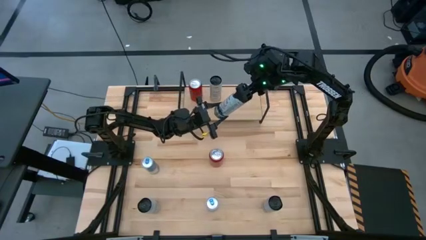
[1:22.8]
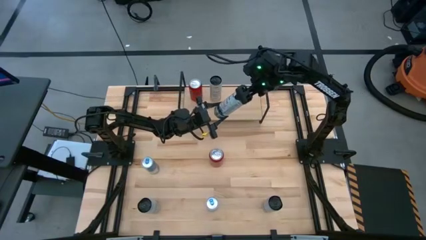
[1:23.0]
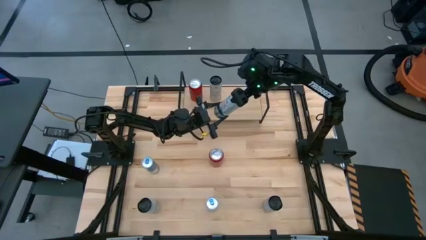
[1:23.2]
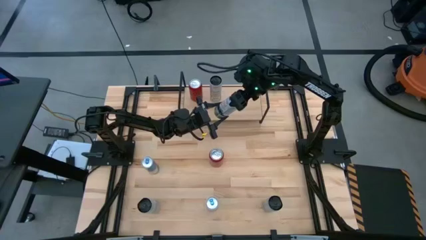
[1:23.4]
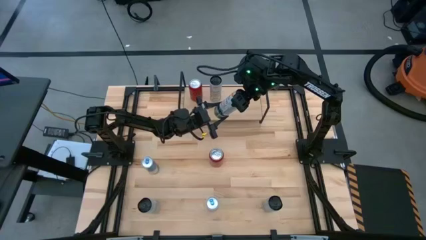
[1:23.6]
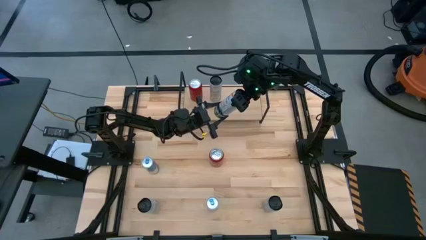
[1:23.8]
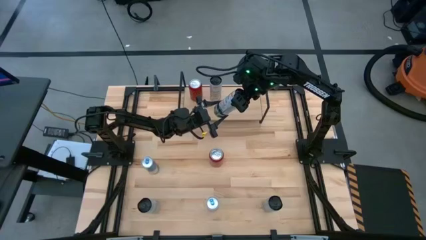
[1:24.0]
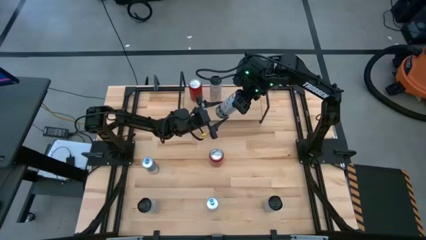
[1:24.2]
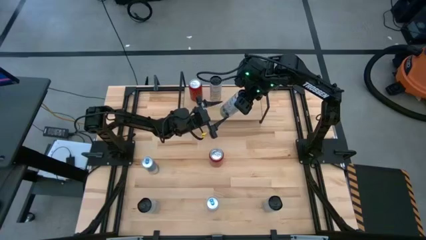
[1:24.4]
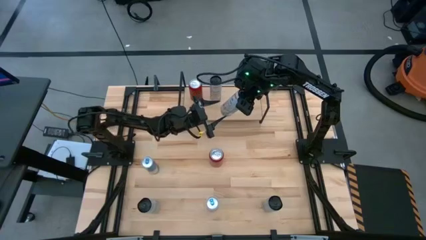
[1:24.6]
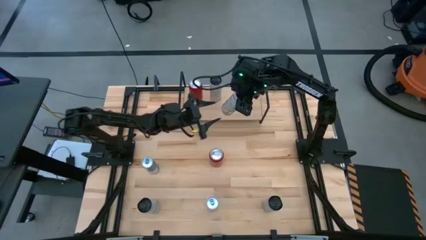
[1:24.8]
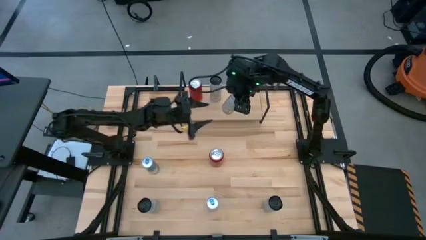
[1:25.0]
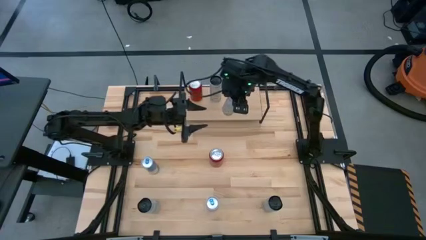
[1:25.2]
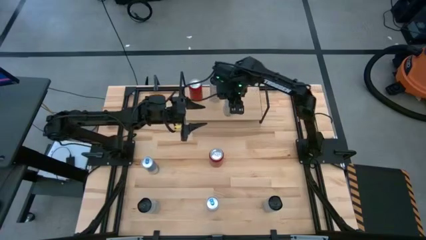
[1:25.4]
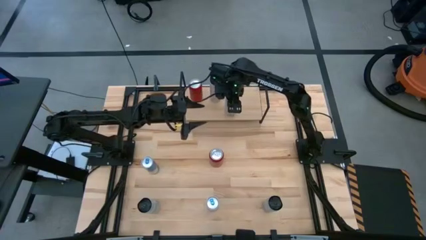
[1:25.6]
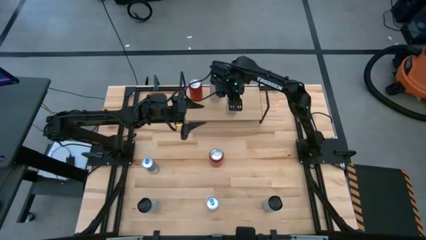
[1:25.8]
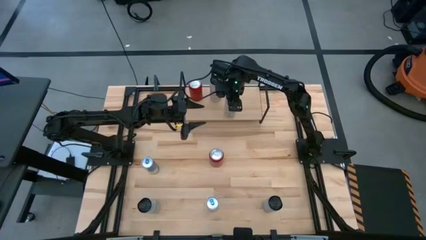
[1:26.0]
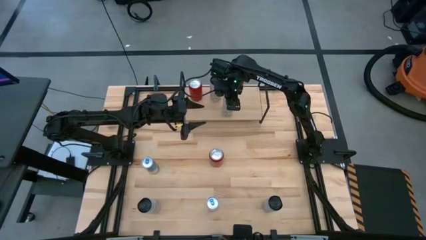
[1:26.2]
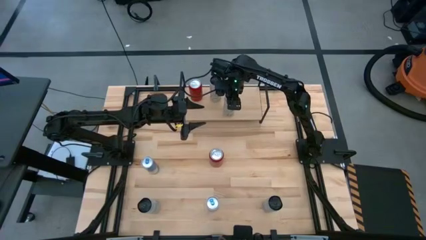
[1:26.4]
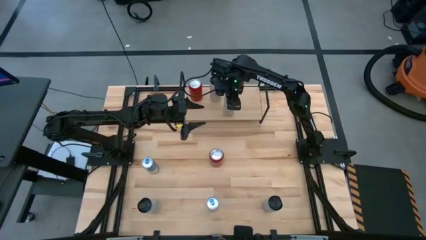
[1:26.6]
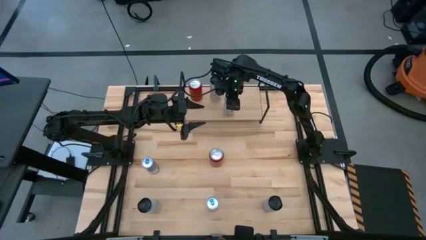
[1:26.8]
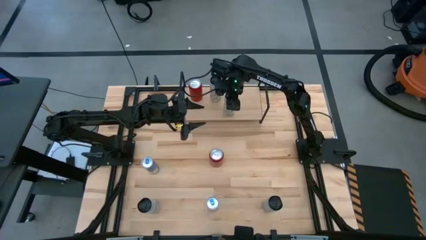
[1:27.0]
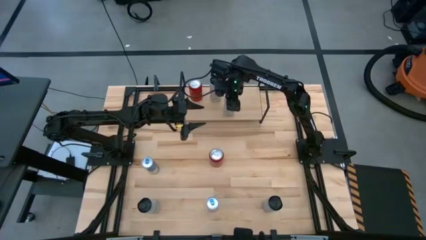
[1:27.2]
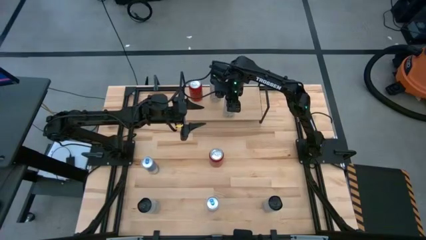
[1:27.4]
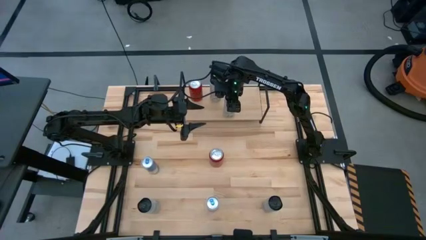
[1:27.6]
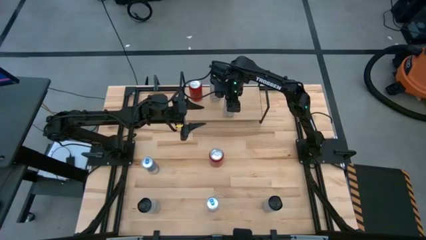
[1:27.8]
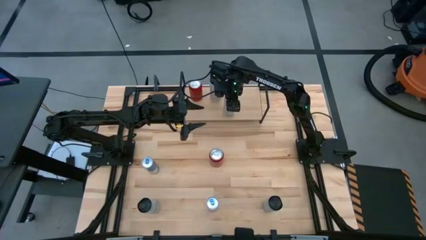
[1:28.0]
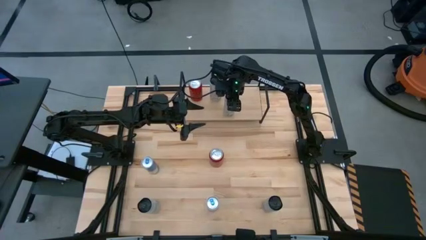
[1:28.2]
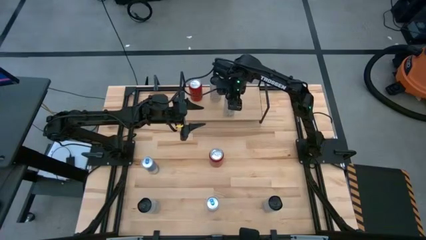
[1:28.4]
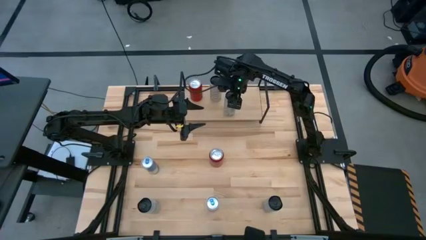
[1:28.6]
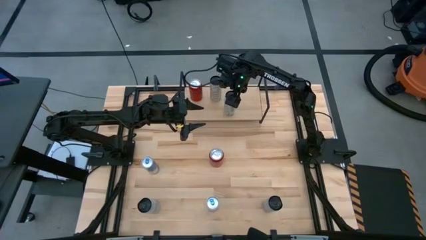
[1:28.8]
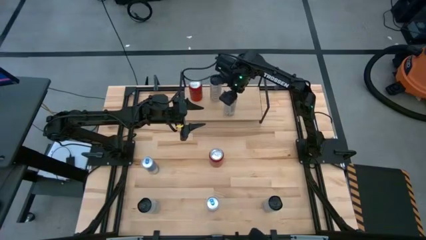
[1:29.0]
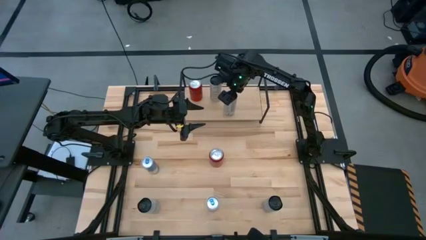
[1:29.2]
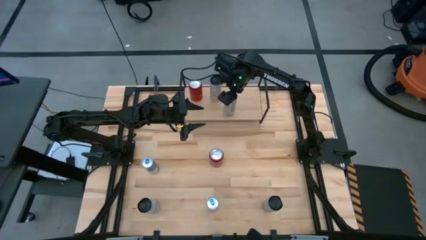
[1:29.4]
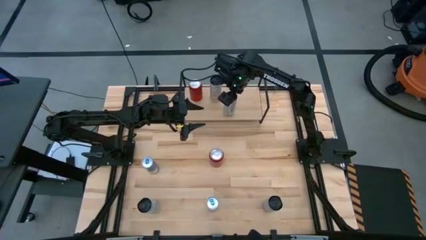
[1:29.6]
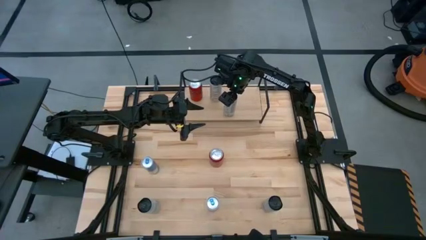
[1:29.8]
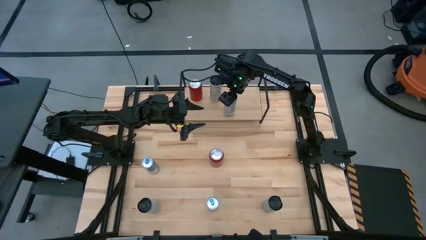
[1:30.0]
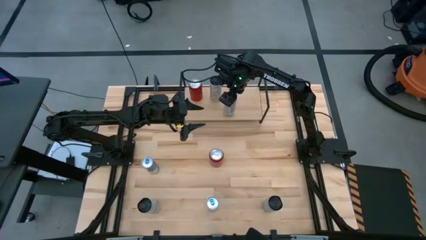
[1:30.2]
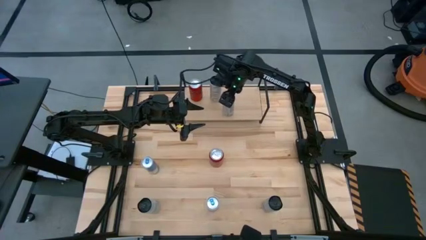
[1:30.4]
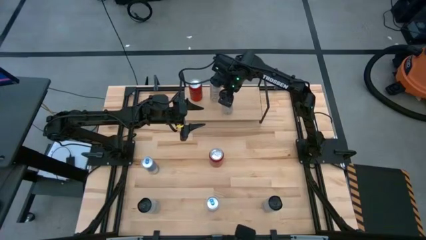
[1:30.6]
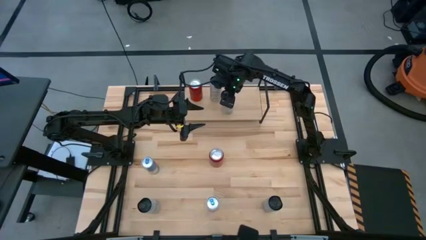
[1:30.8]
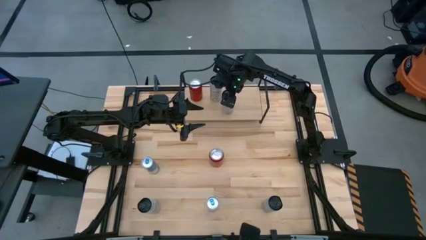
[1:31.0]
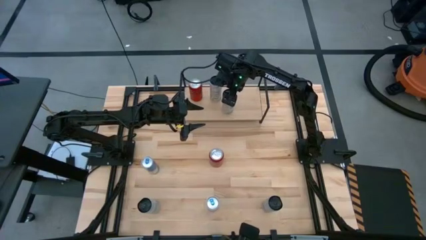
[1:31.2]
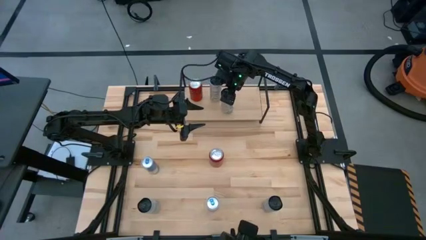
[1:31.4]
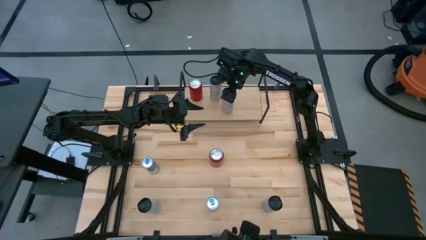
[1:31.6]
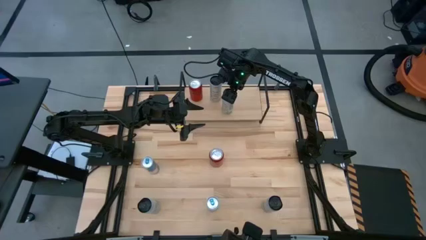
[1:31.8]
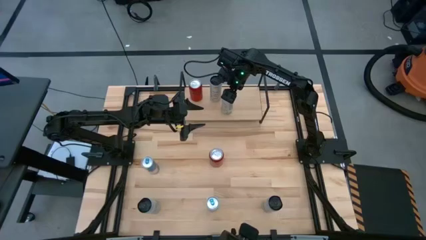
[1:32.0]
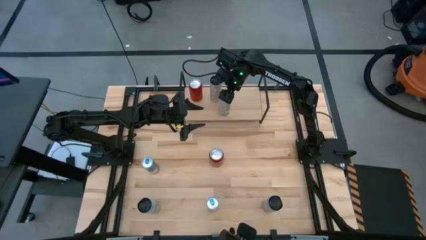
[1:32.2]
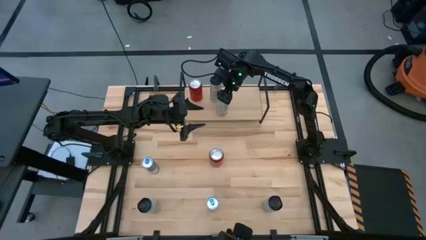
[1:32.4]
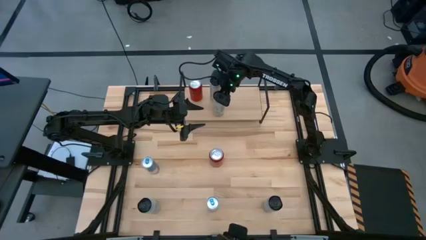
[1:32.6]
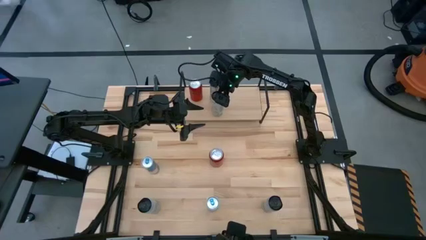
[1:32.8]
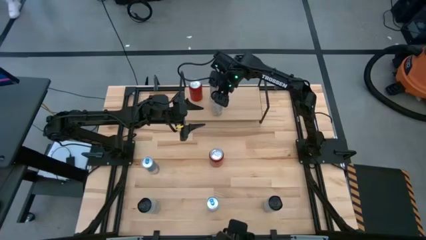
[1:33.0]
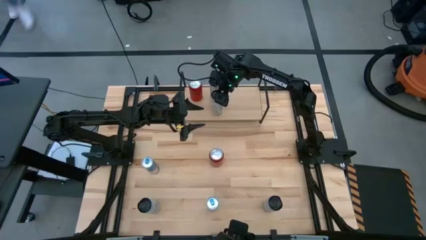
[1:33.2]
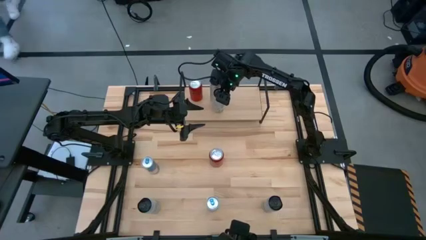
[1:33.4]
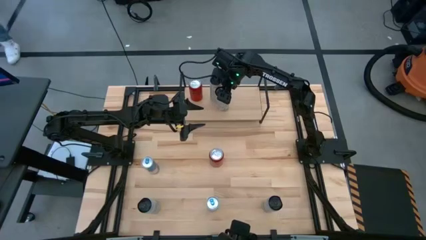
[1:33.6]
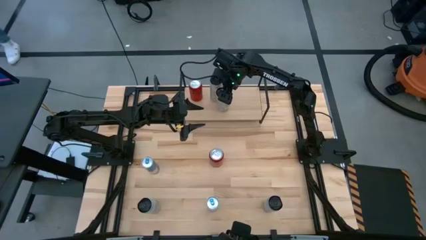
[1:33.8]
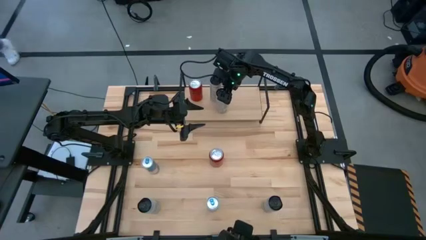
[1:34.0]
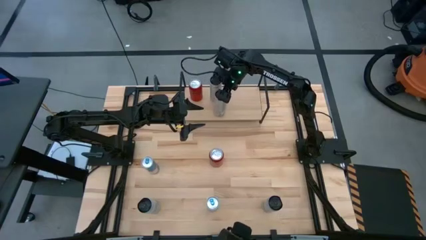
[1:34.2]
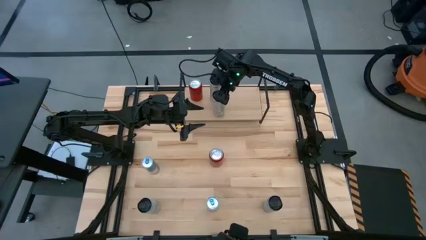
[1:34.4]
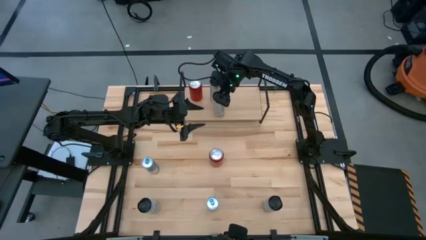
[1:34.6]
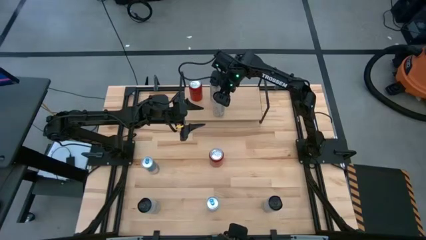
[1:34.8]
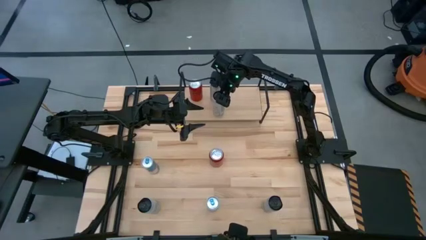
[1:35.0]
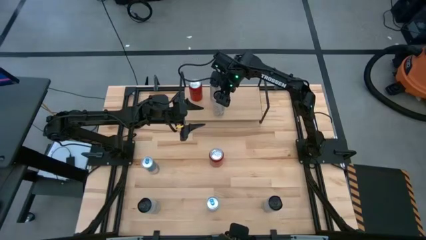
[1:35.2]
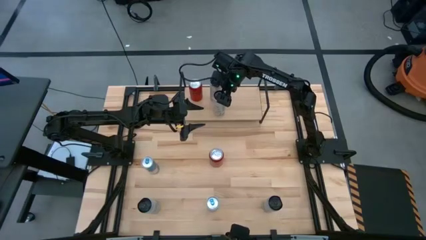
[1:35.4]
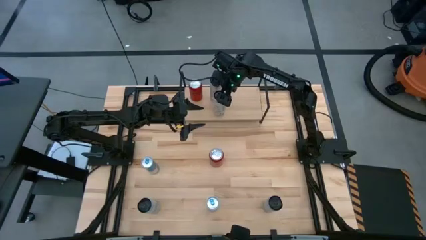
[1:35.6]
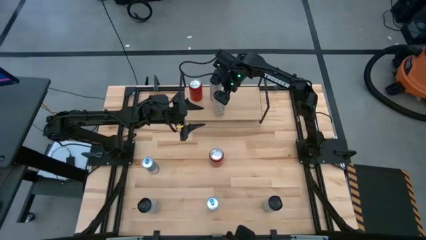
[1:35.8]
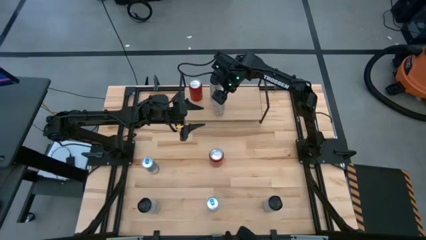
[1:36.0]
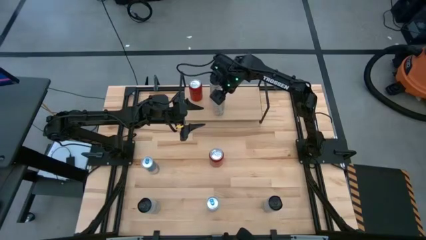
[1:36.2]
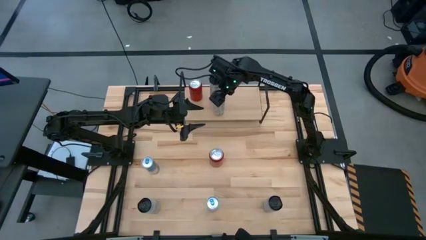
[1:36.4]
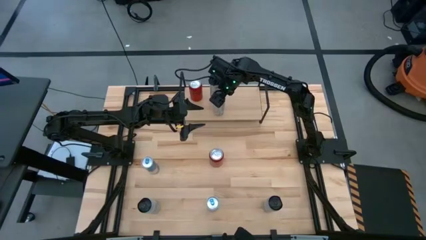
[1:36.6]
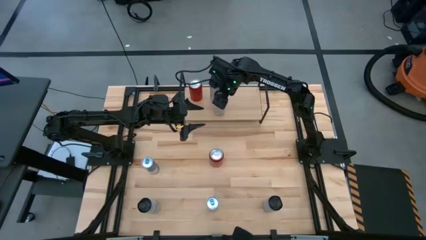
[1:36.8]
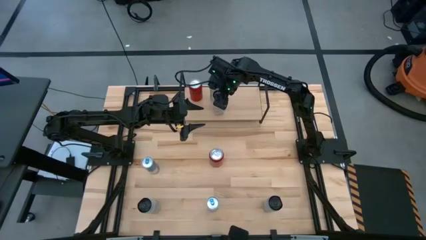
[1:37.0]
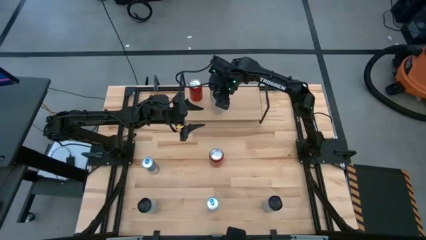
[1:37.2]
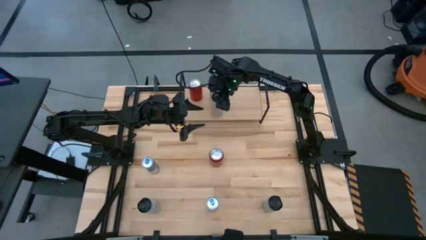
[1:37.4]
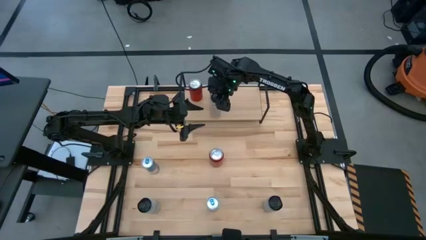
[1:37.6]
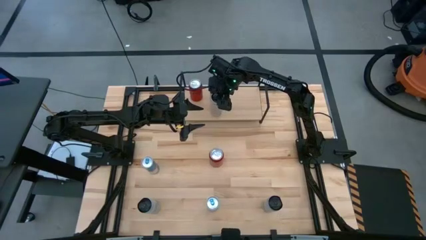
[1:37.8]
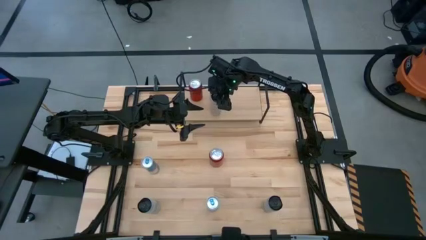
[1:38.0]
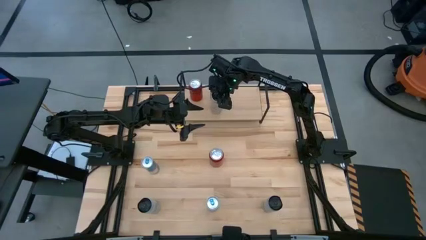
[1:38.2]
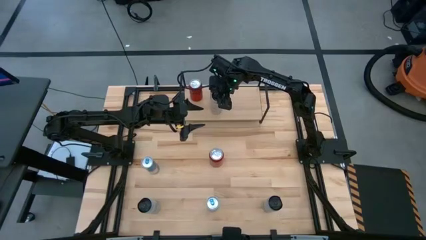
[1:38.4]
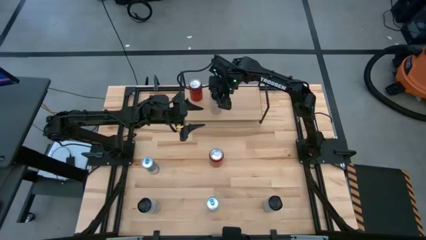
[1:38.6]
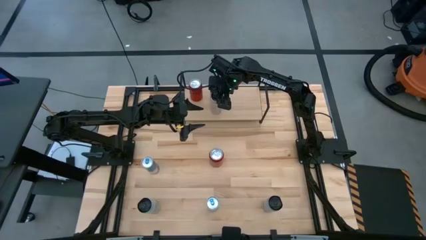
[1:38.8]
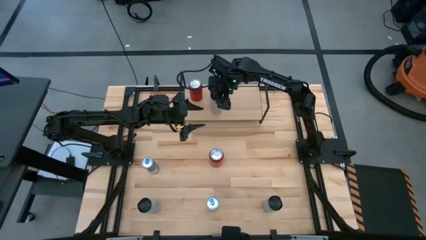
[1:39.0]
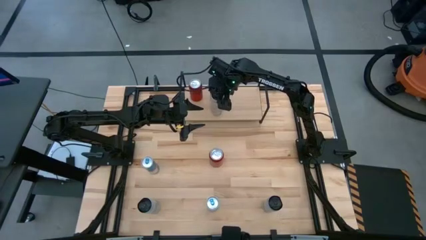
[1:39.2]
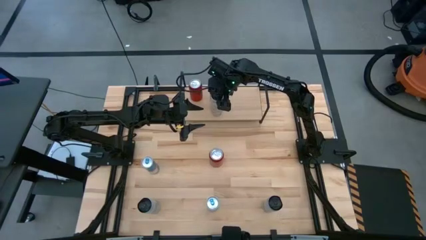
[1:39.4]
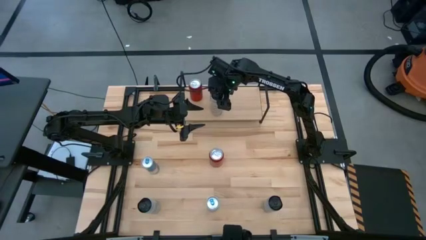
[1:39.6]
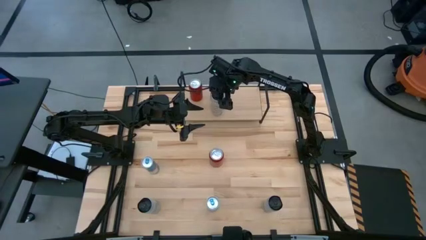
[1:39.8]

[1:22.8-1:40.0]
Task: Place canned beverage on shelf
Put the white yellow soda can aligned with the other white yellow soda can on the shelf
